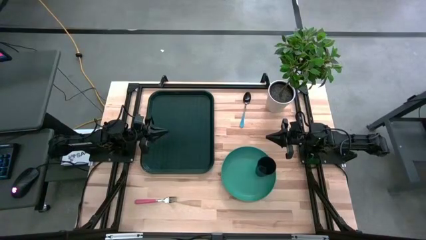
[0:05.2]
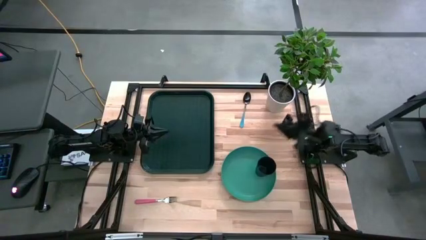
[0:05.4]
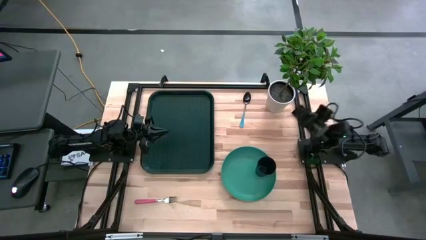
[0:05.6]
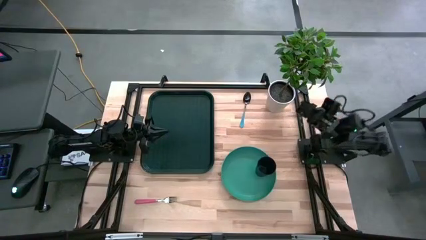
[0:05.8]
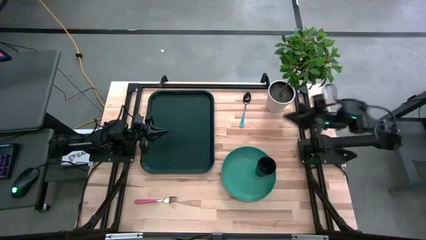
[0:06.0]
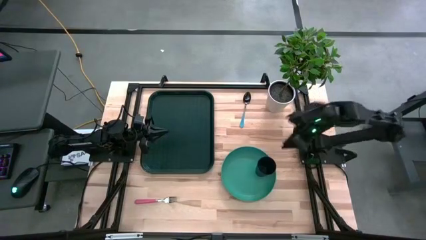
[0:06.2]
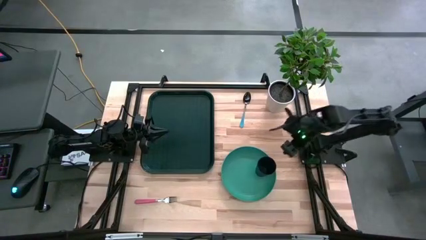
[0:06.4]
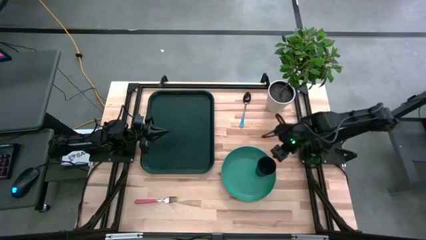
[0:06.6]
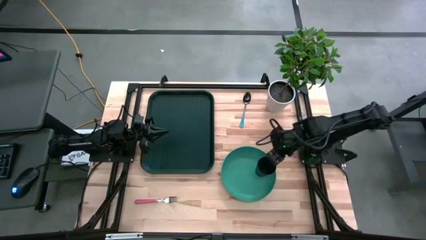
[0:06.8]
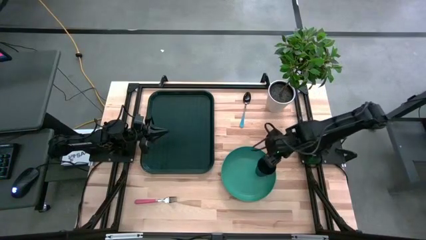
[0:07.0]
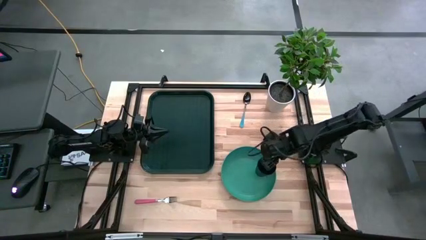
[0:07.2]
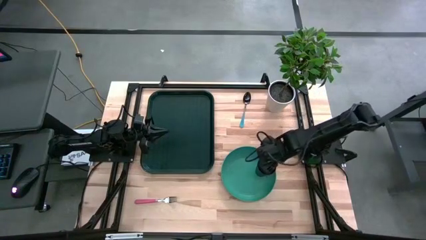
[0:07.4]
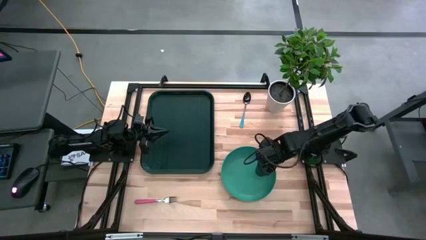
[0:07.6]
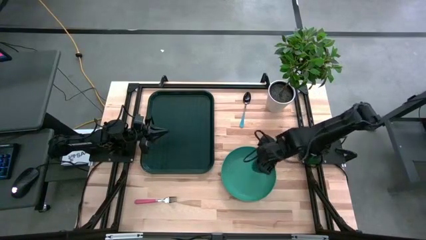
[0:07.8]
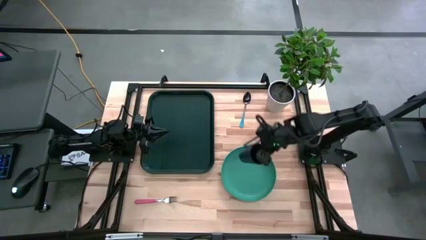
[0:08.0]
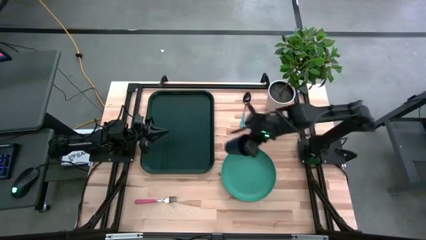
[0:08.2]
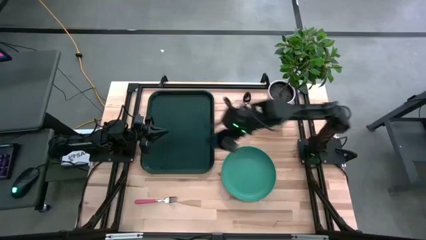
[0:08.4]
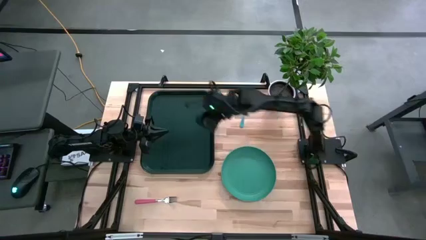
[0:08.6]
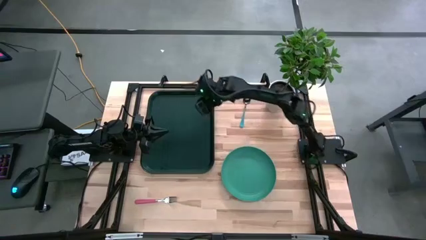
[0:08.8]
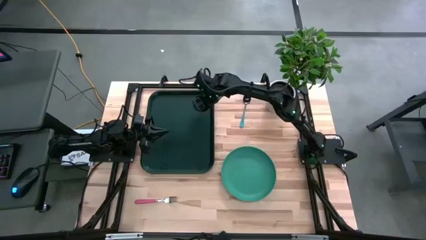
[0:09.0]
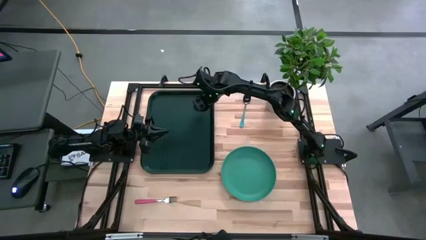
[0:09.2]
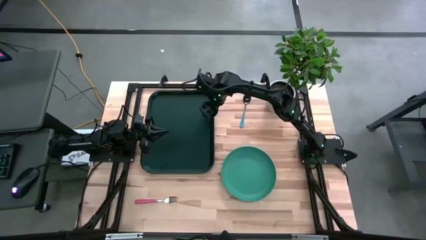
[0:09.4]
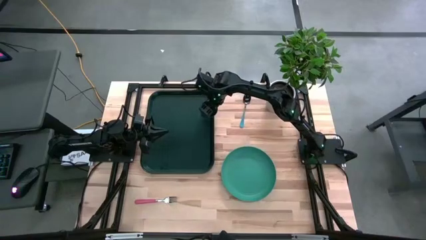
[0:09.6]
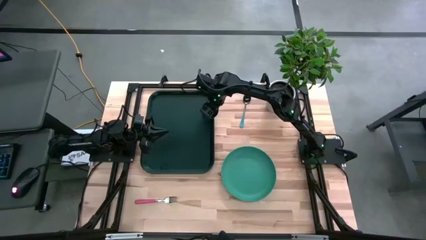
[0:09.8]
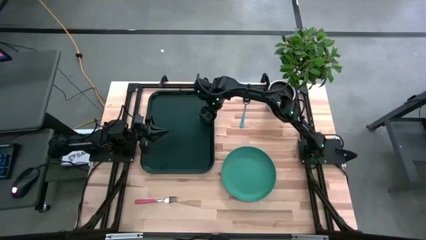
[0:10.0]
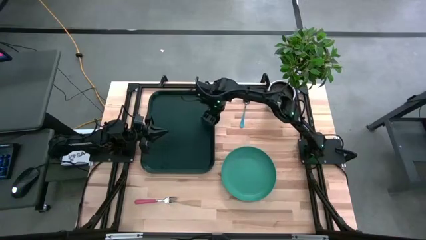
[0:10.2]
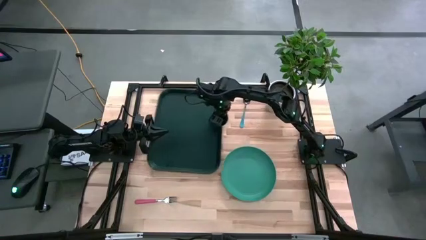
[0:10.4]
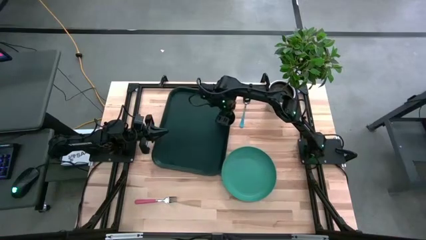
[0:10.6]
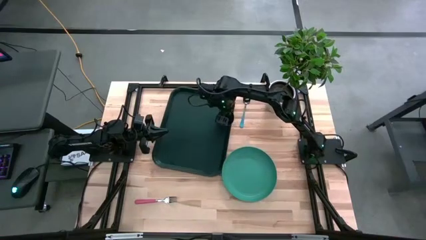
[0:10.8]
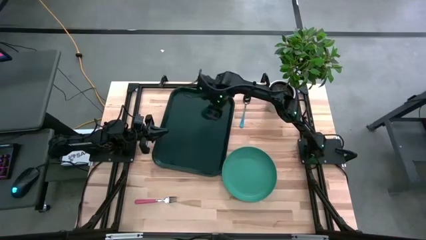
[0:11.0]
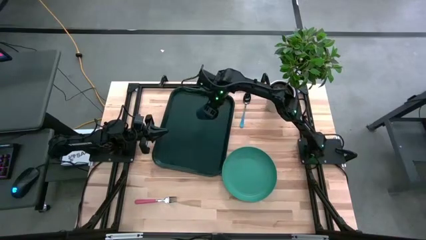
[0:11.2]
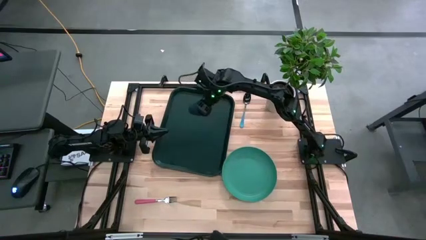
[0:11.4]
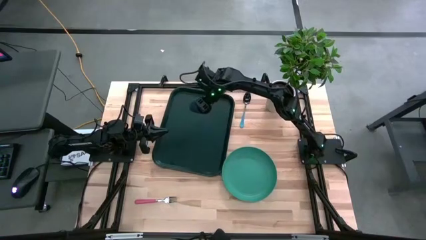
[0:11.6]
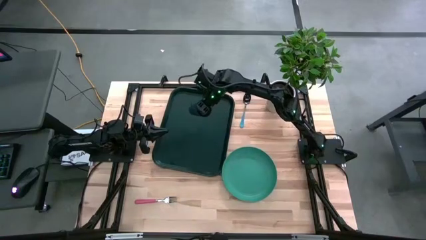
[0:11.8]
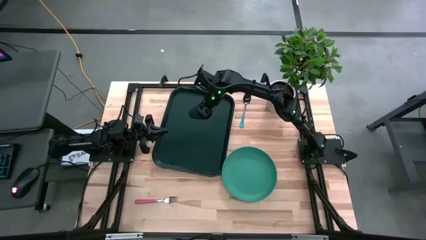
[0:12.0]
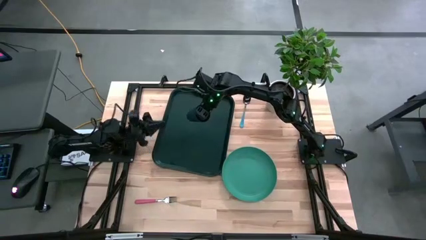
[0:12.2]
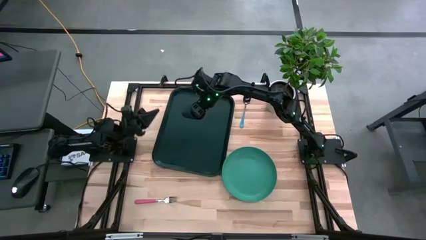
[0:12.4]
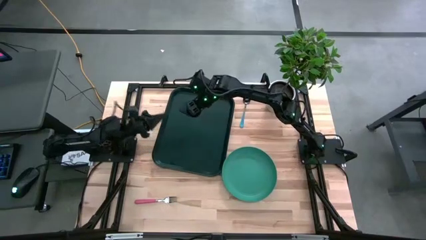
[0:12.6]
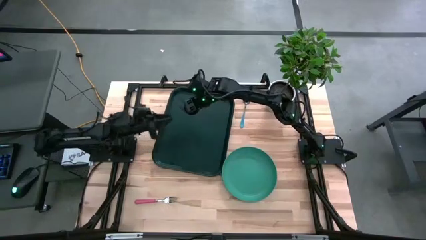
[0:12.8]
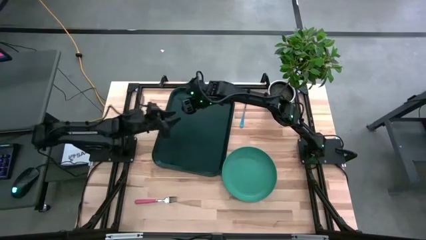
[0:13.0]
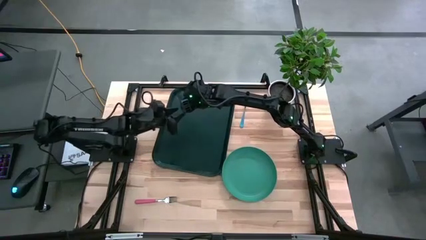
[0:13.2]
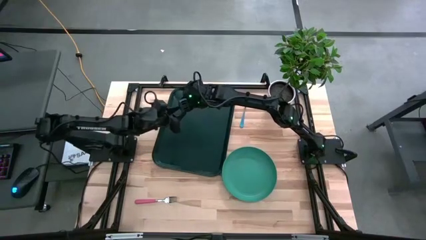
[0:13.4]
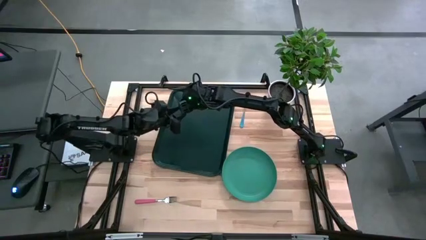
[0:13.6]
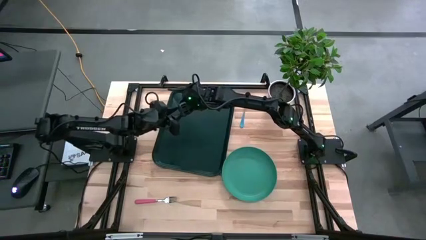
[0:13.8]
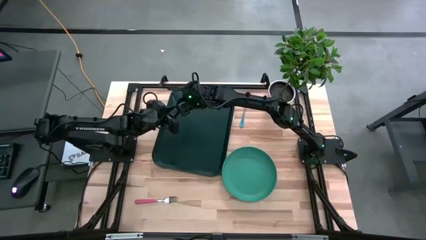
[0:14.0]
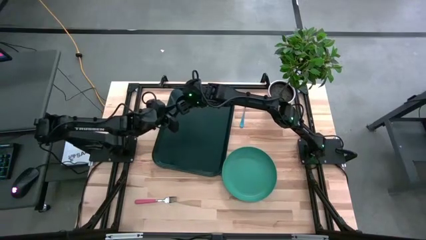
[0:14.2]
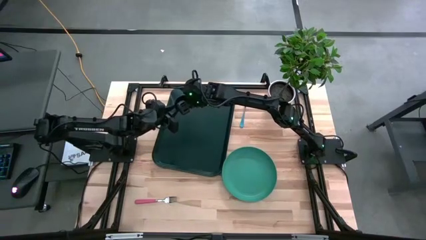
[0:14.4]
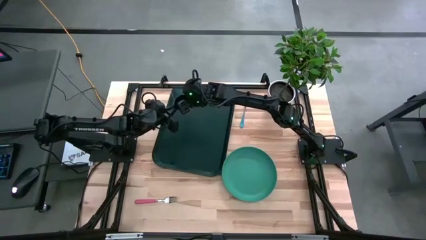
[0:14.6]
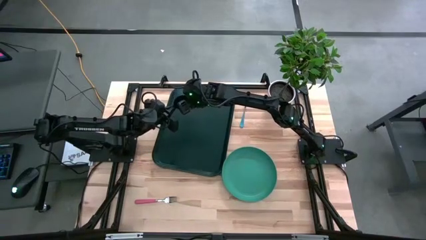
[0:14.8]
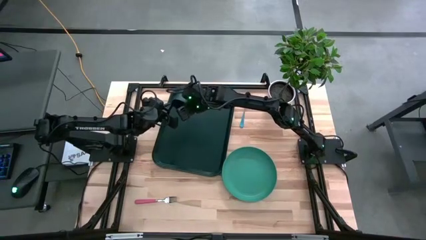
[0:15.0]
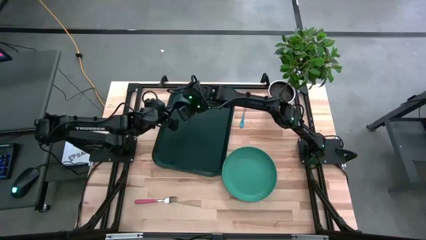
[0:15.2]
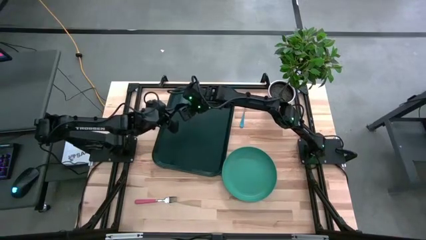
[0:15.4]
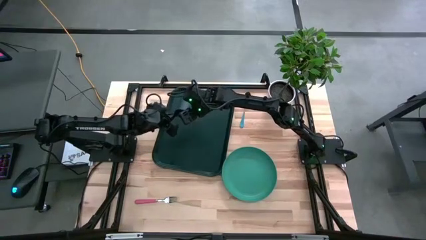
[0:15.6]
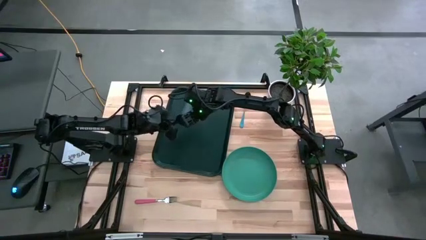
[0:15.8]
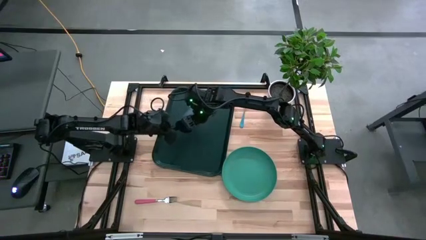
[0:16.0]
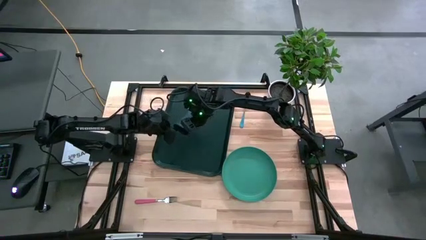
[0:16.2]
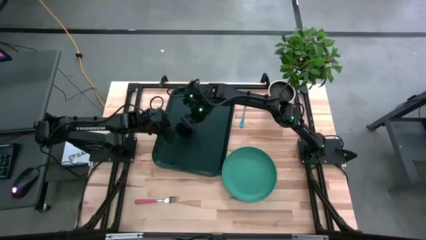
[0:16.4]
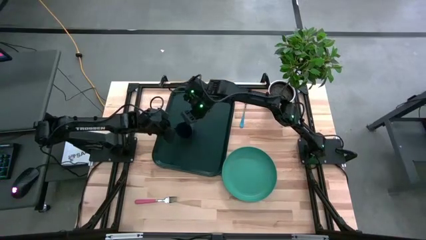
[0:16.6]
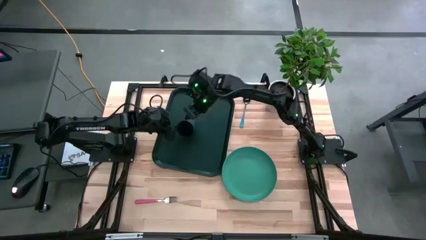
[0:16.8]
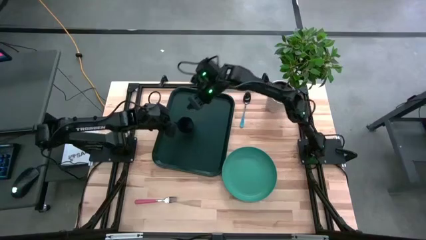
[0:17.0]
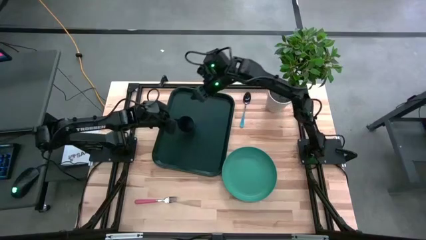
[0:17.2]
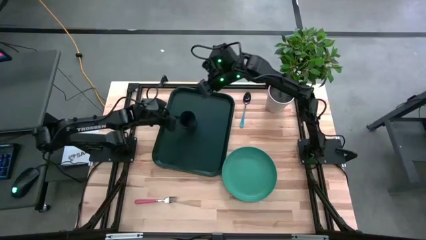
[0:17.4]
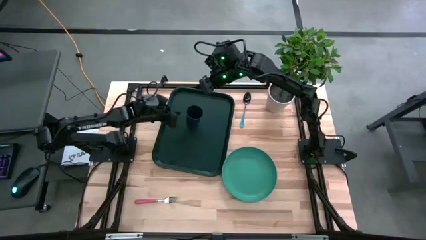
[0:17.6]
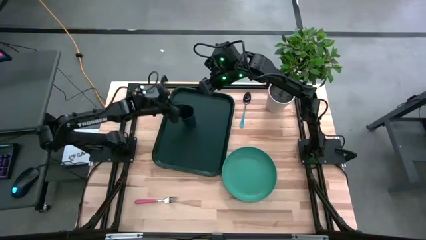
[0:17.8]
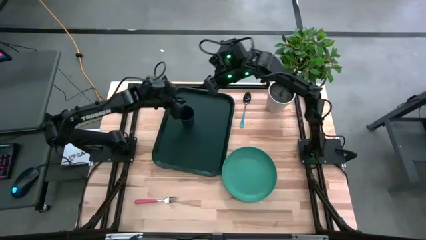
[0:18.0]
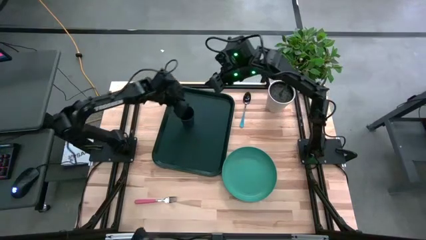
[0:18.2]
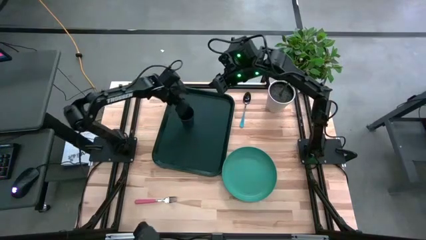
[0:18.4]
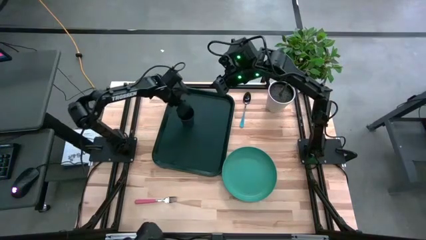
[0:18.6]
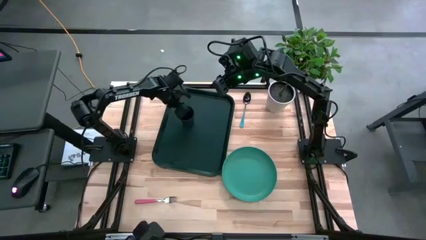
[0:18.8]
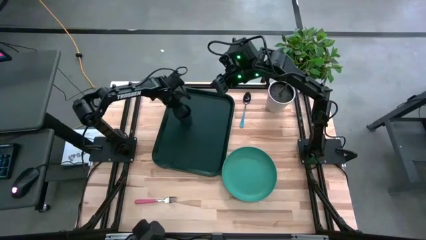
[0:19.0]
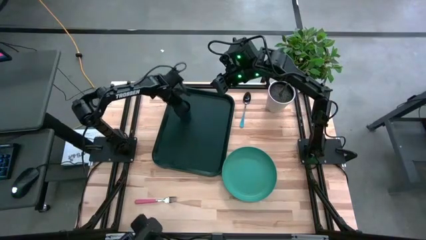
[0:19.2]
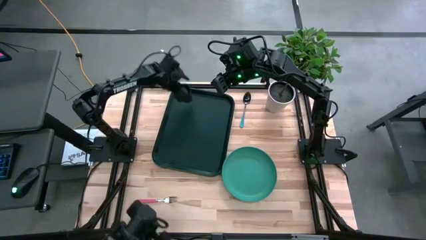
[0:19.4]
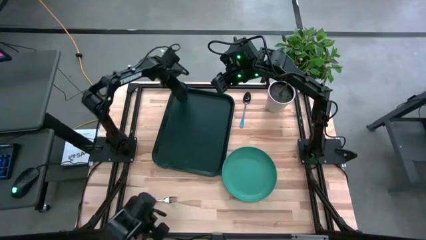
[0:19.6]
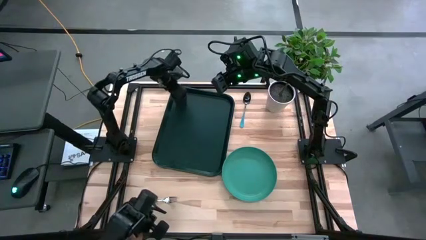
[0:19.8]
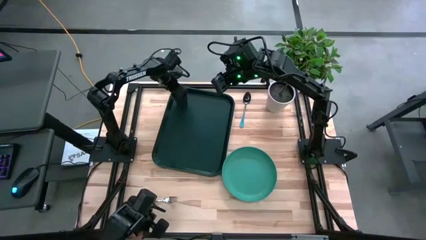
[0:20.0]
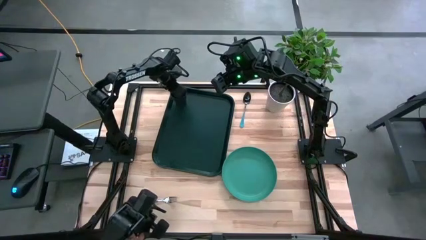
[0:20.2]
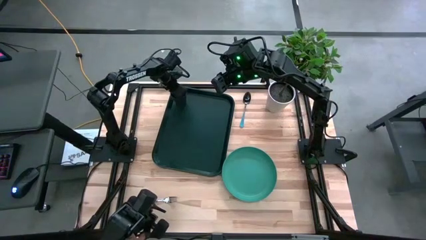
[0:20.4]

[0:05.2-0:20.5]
Task: Pick and place plate/cup/fork/spoon on tray
Put the black cup on the top left of the black serving tray
